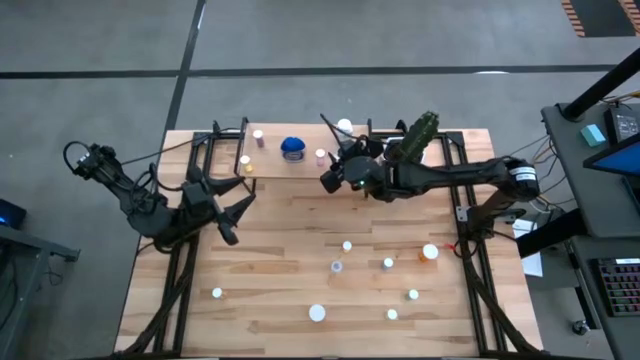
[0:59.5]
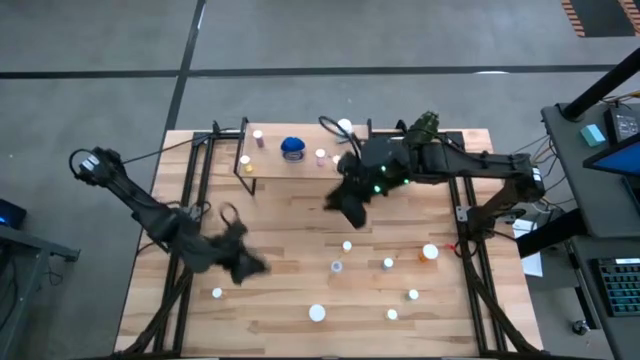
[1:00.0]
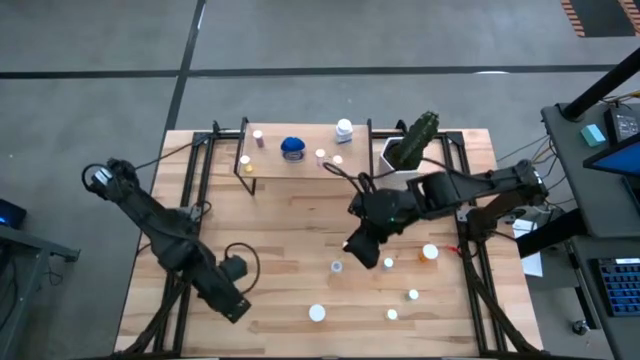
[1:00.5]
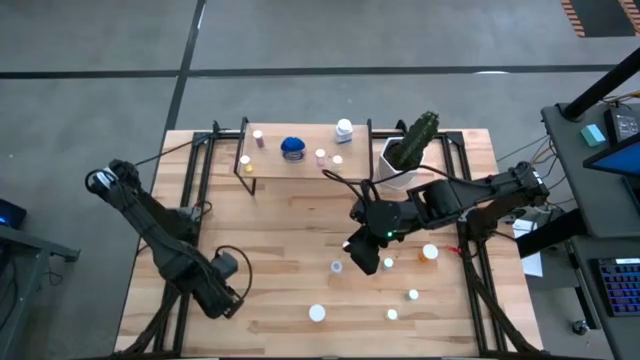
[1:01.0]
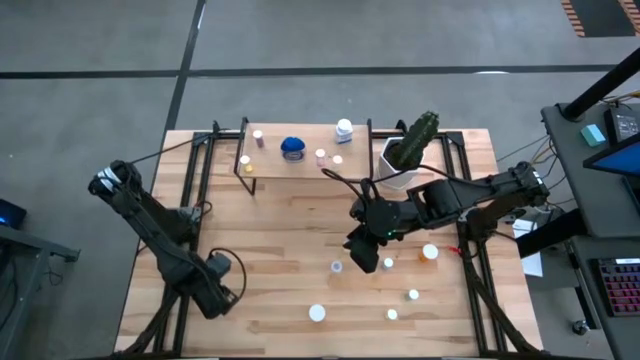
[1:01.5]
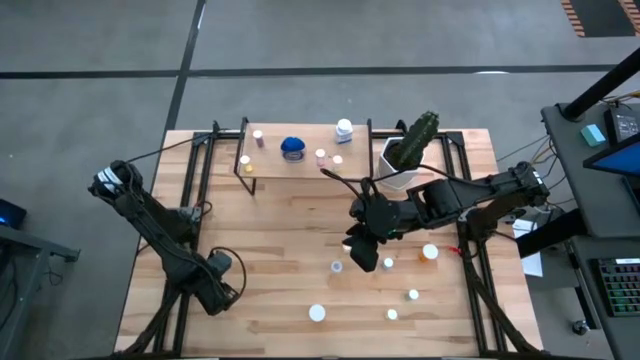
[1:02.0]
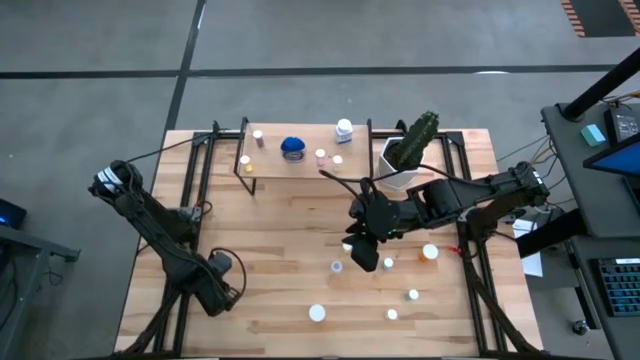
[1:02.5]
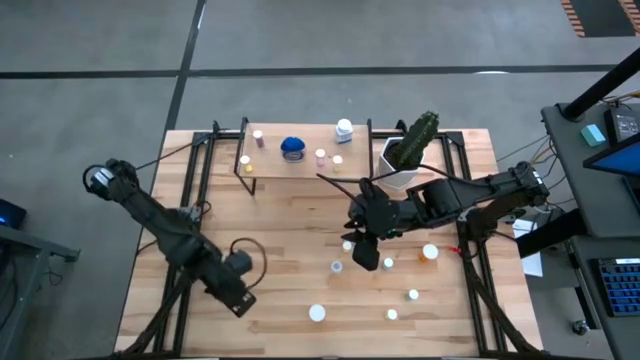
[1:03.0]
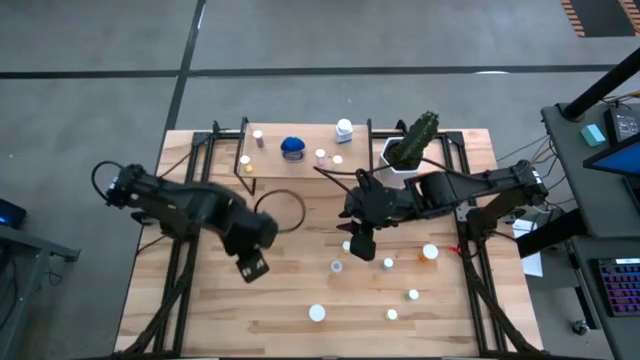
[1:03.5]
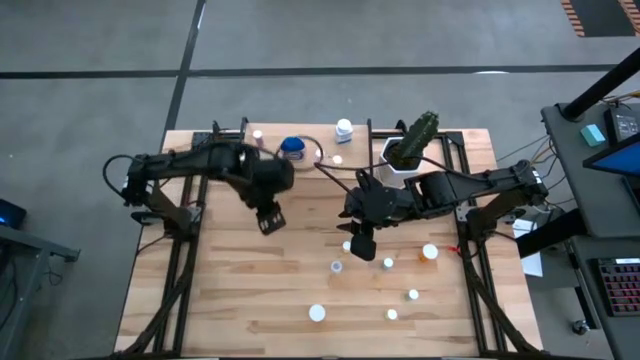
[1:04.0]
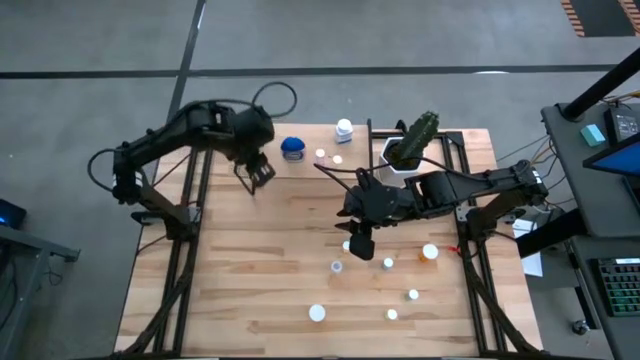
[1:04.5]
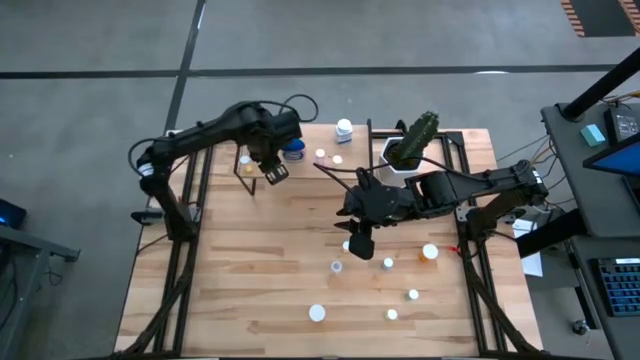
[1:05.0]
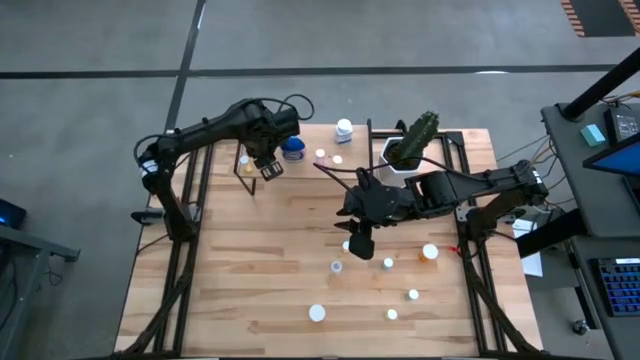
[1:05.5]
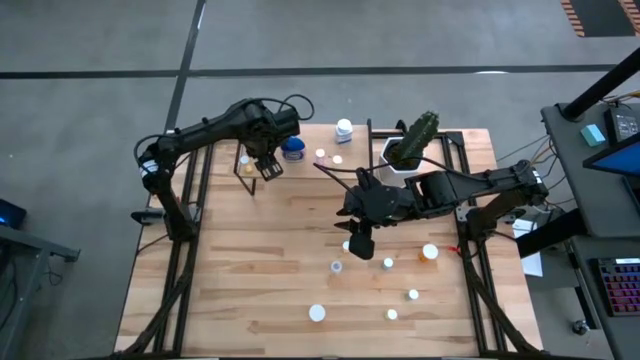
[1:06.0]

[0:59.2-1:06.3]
Task: Pick and place medicine bottles onto shelf by color
Put the yellow pill bottle on the shelf

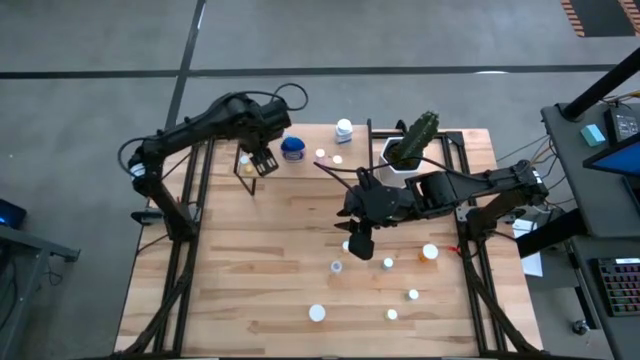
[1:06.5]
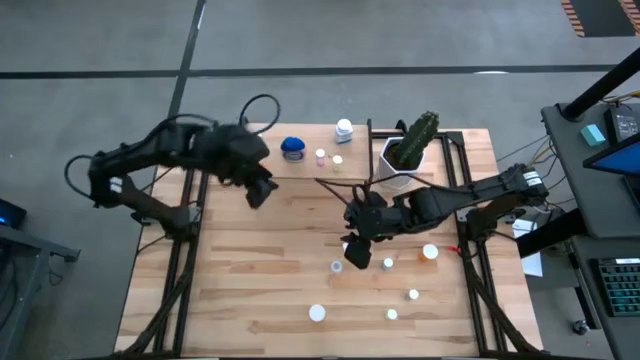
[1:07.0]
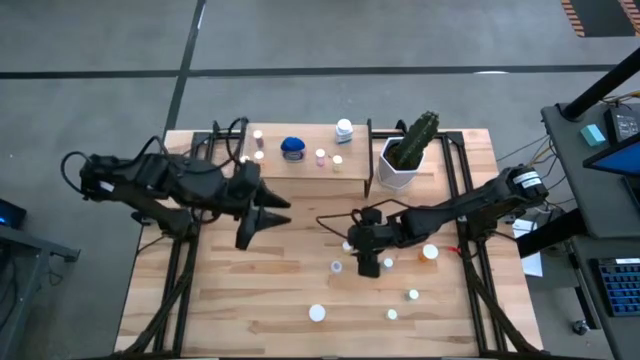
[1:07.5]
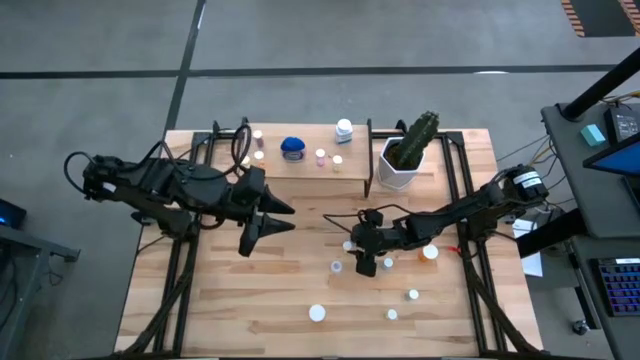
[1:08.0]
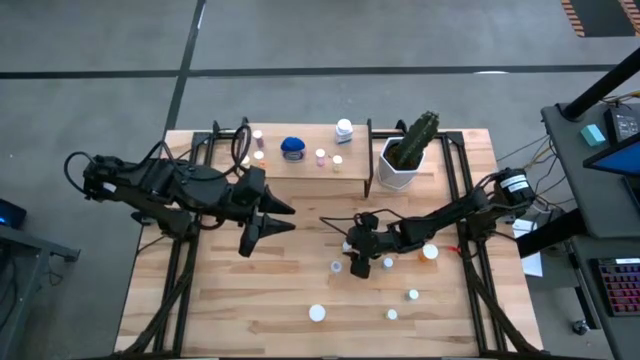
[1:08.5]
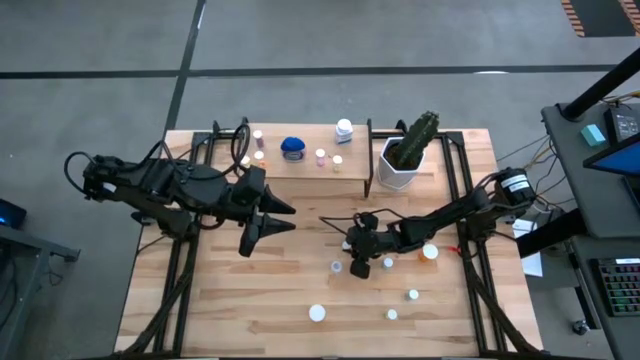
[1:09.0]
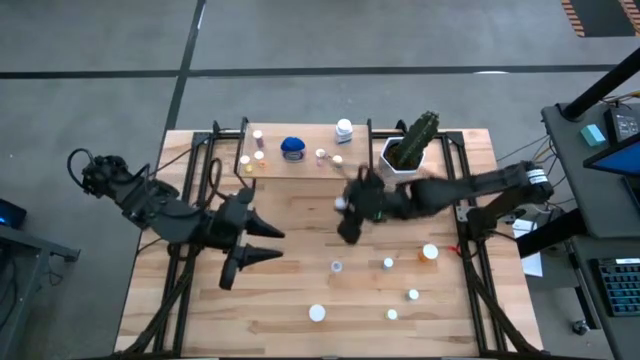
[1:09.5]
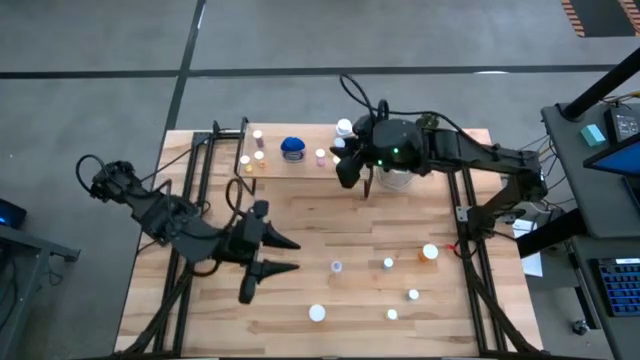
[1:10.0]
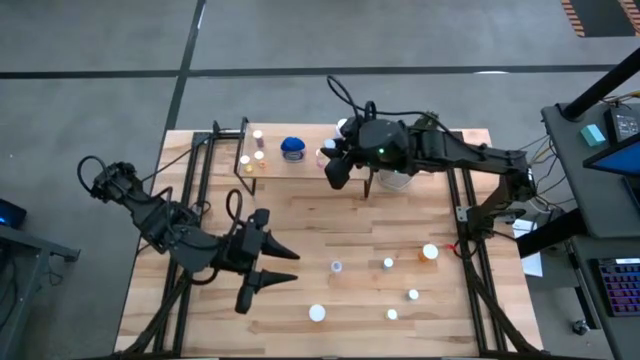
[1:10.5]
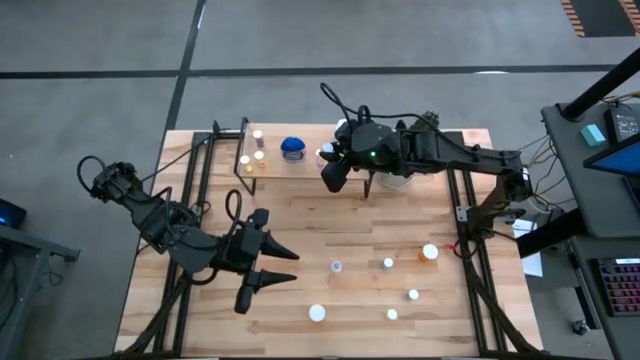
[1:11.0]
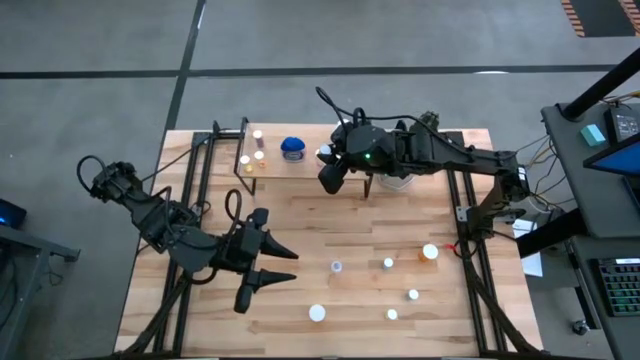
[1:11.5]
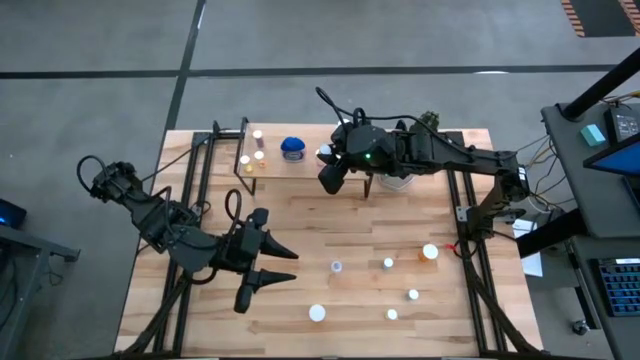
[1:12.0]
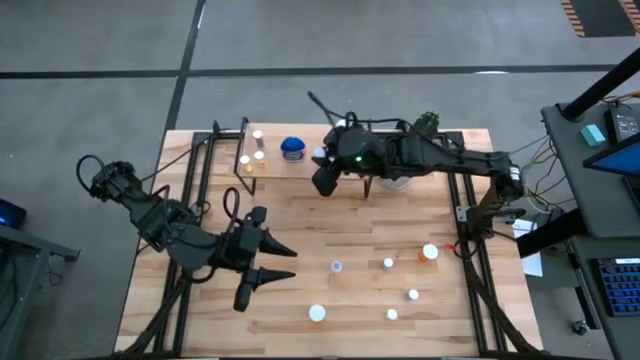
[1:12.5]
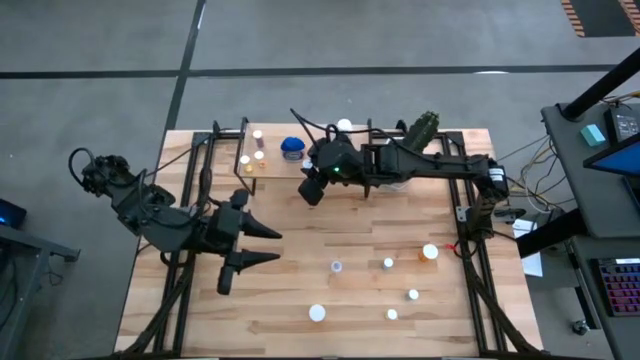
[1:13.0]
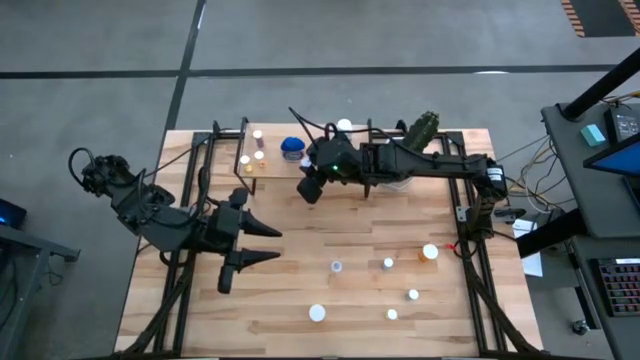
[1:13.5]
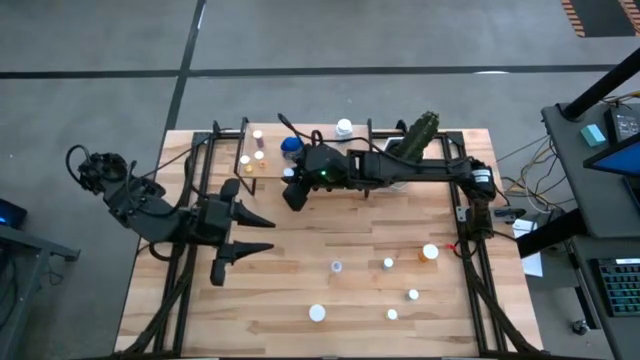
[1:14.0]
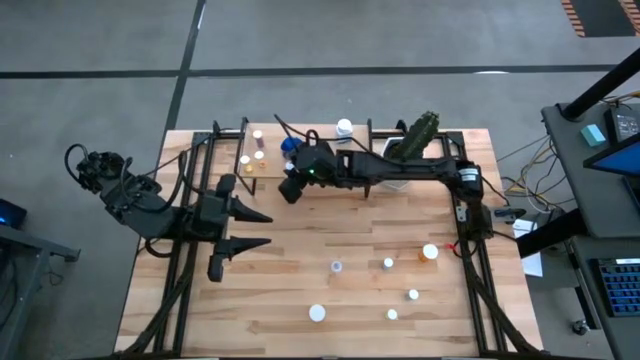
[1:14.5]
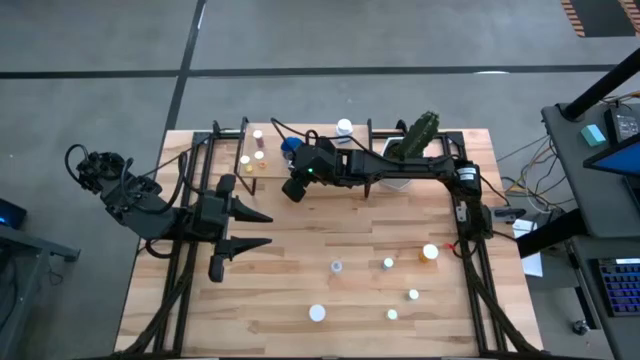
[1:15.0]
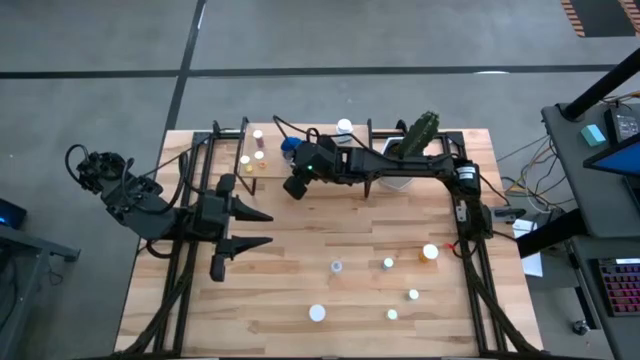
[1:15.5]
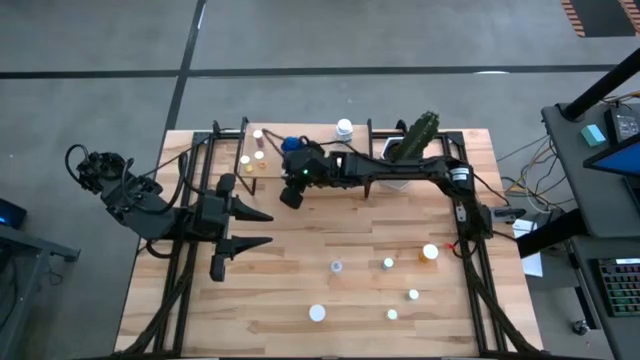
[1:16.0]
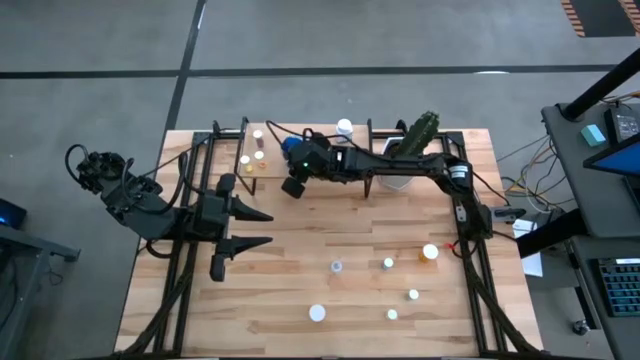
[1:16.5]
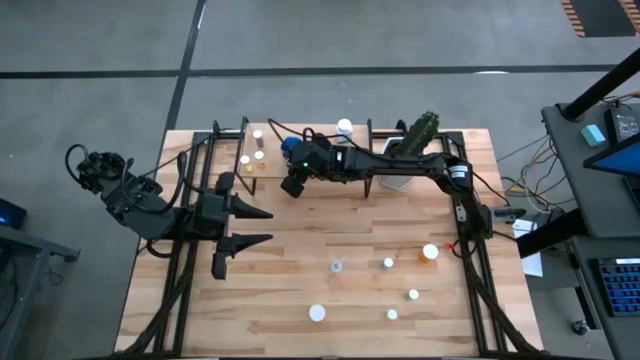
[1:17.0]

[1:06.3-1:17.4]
Put the yellow pill bottle on the shelf

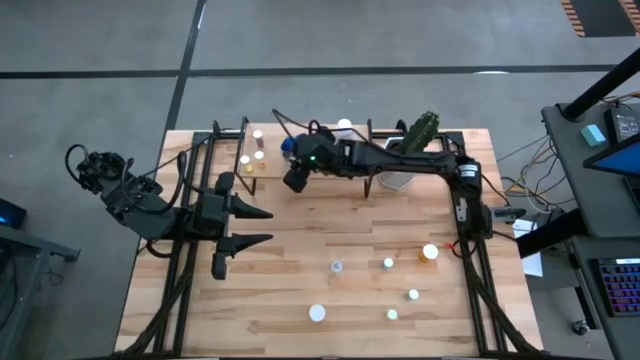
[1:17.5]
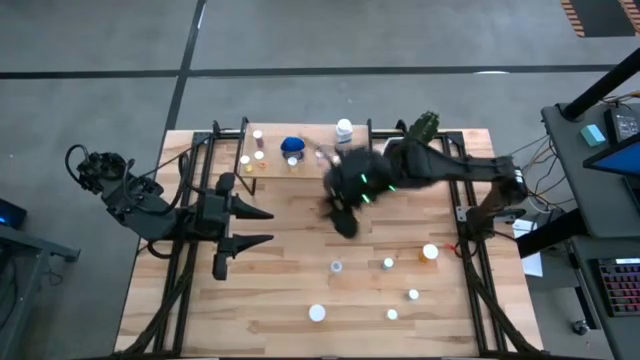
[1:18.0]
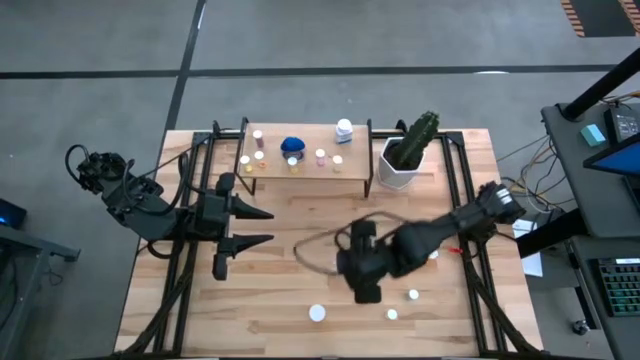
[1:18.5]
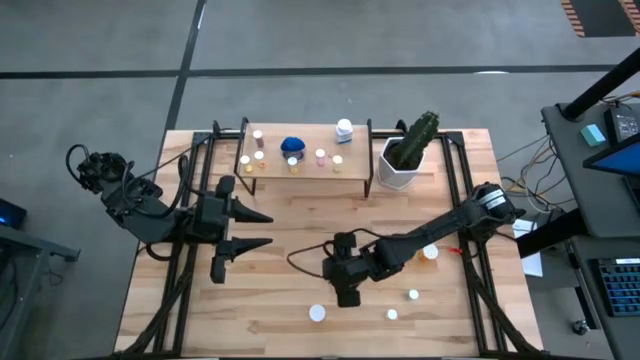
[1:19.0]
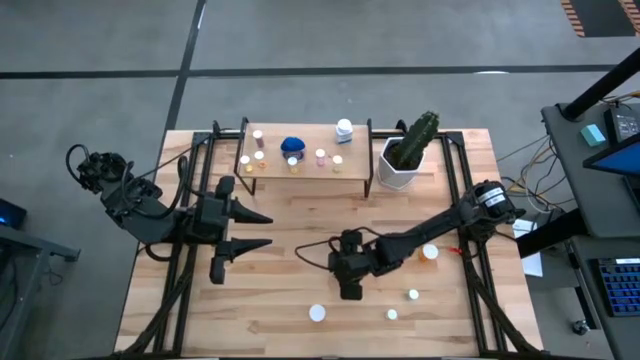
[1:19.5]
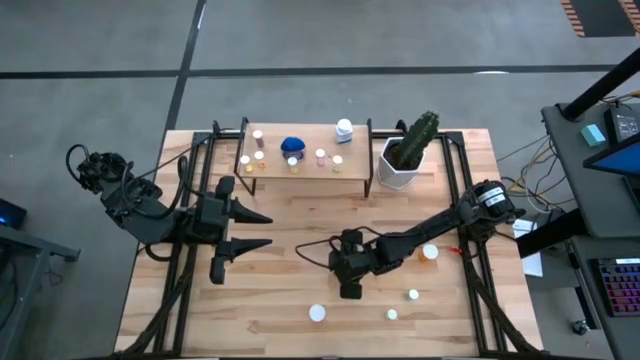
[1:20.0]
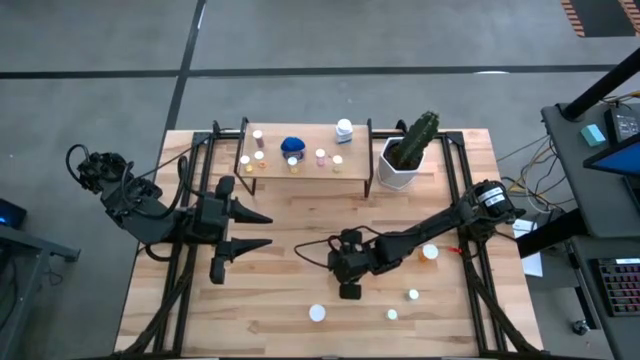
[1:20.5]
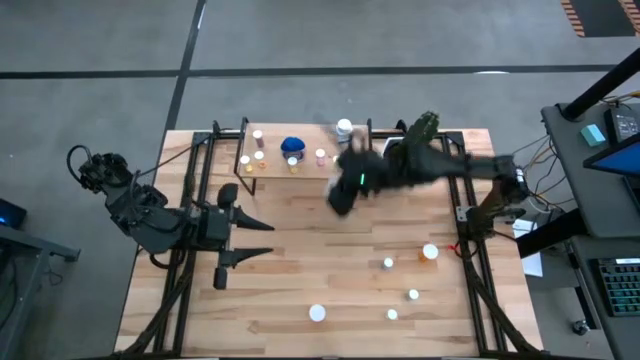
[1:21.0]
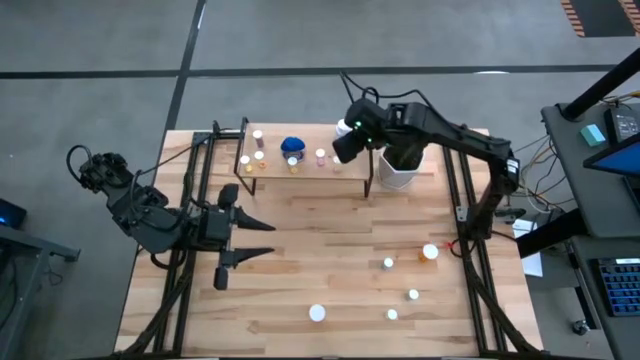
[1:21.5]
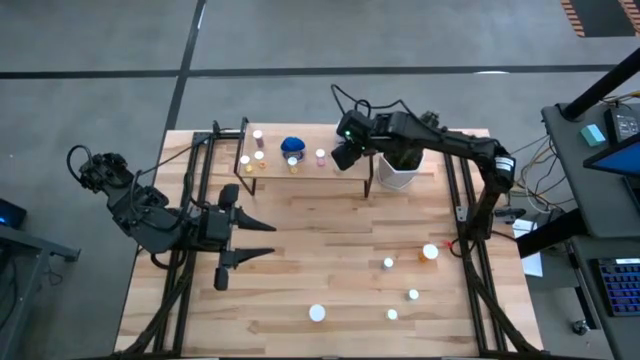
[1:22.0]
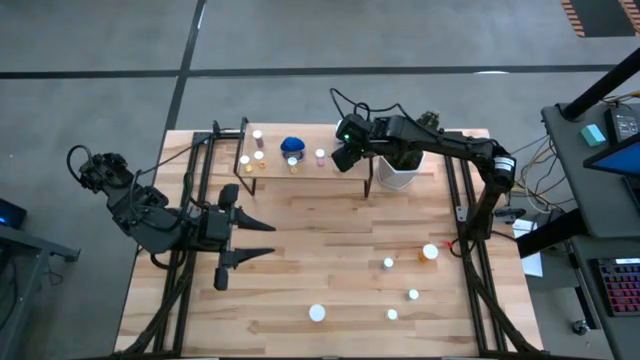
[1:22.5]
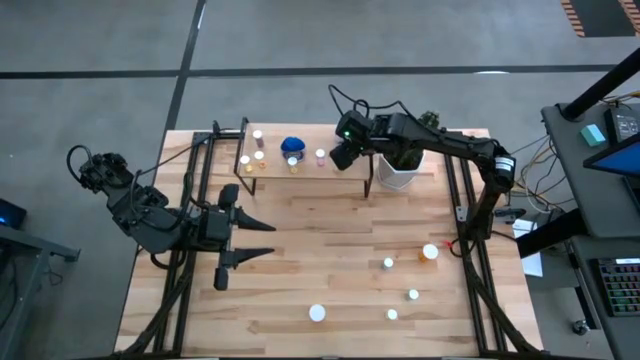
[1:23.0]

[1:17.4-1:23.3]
Put the transparent pill bottle on the shelf
